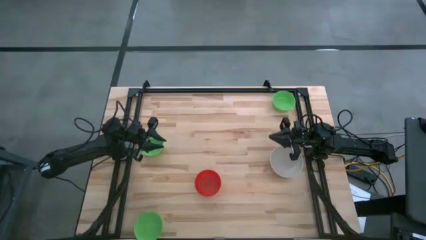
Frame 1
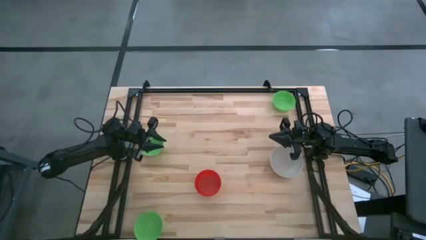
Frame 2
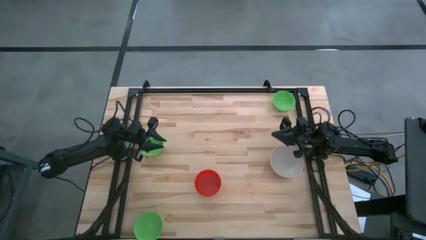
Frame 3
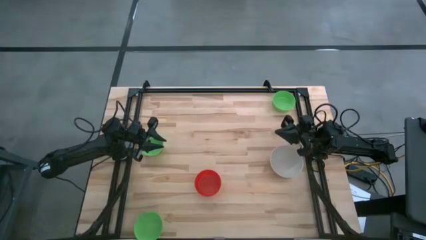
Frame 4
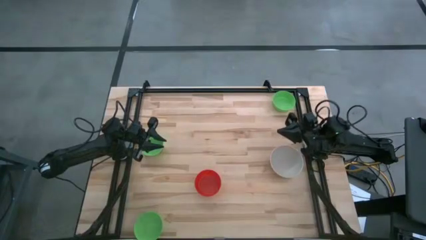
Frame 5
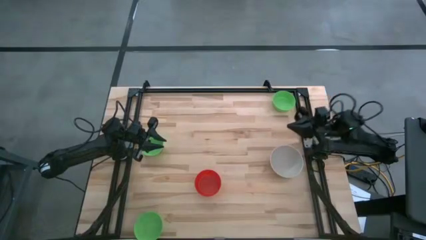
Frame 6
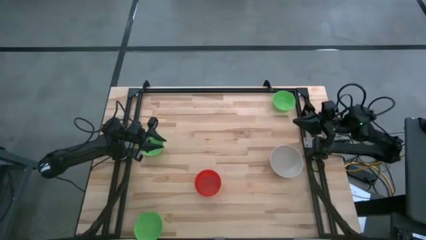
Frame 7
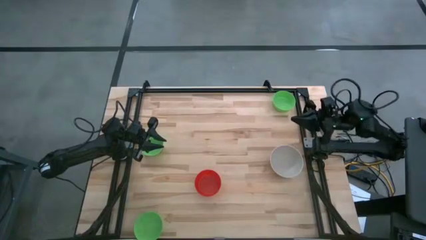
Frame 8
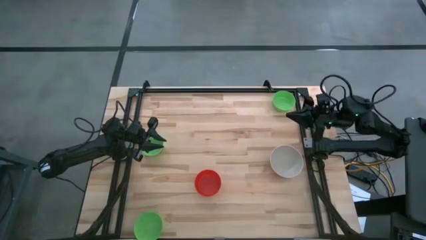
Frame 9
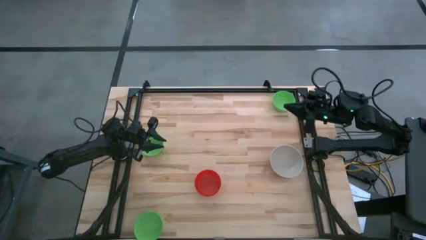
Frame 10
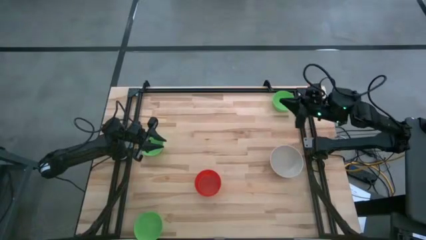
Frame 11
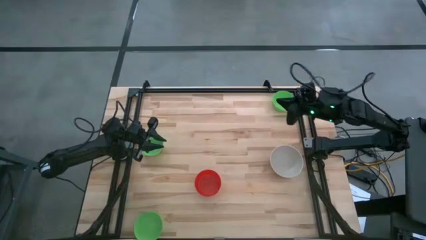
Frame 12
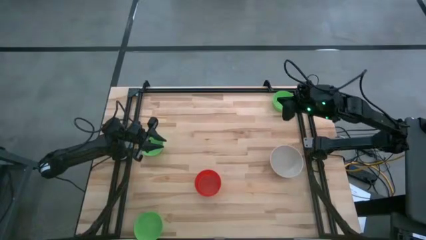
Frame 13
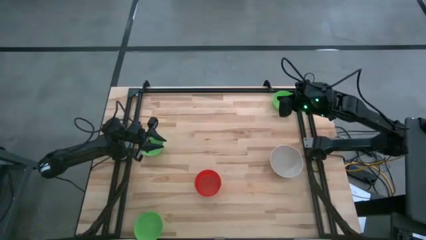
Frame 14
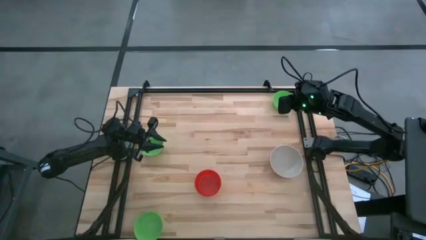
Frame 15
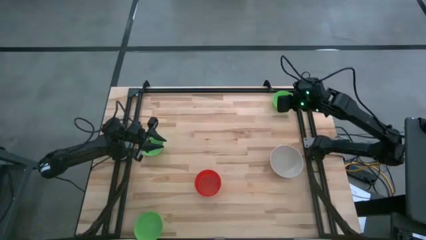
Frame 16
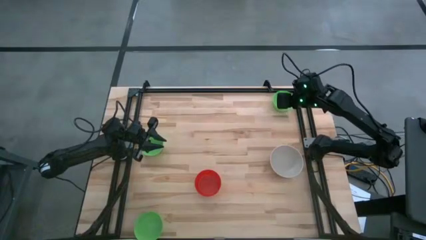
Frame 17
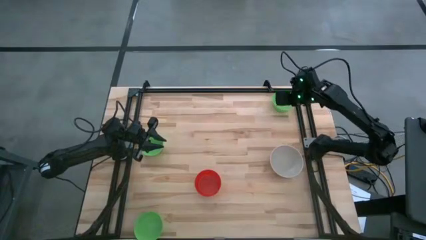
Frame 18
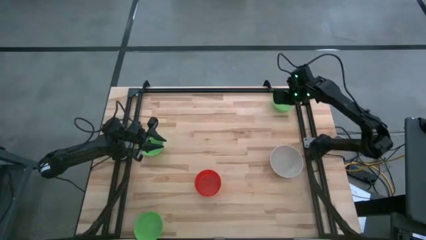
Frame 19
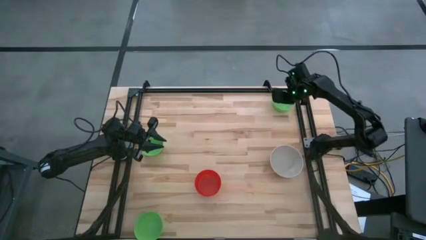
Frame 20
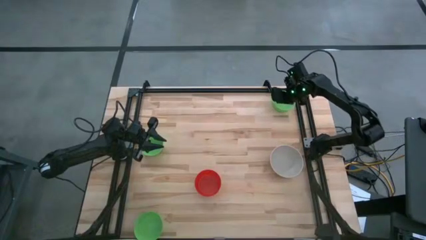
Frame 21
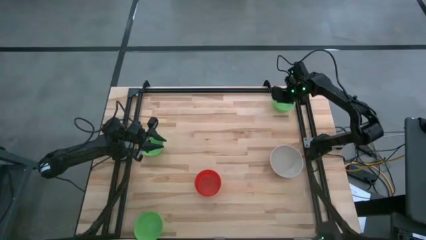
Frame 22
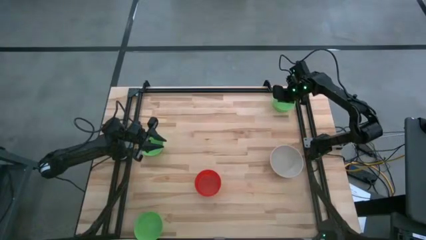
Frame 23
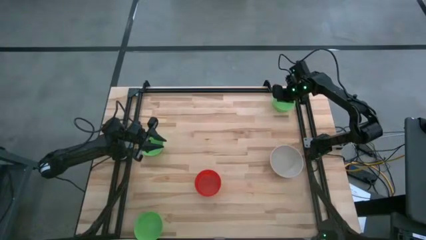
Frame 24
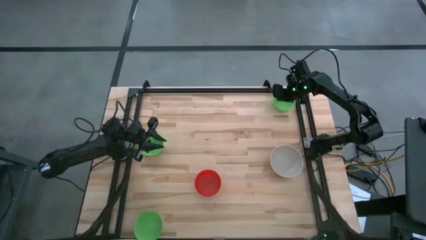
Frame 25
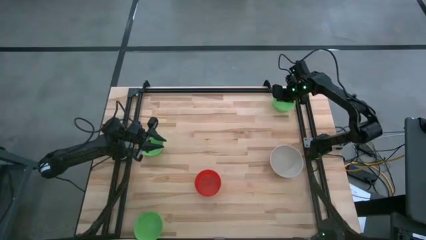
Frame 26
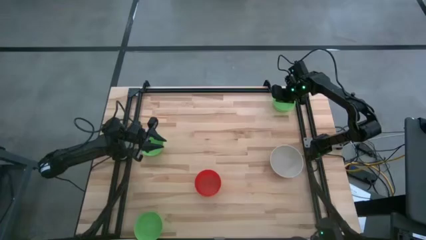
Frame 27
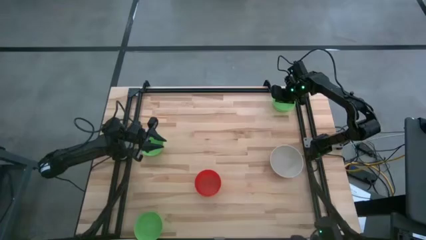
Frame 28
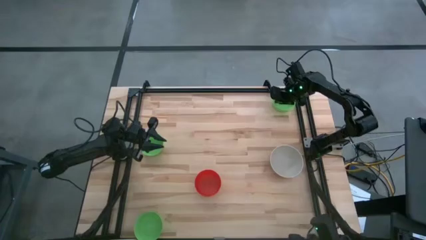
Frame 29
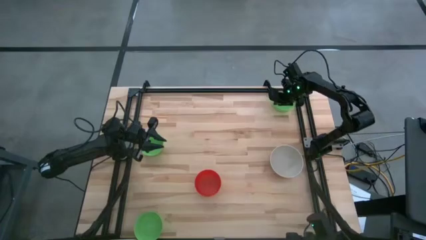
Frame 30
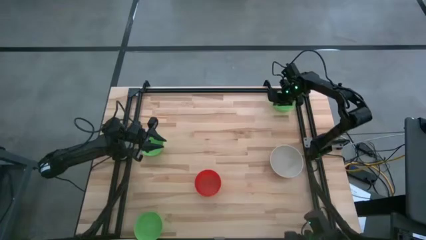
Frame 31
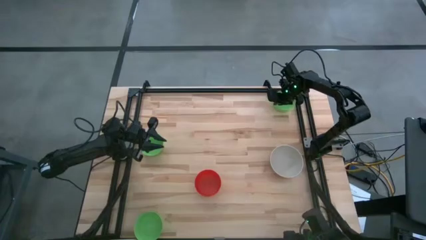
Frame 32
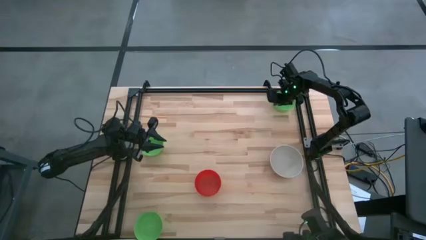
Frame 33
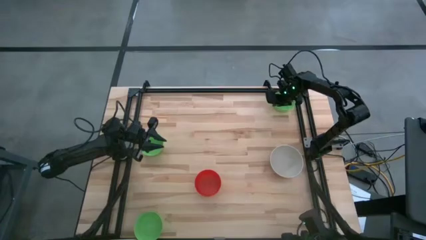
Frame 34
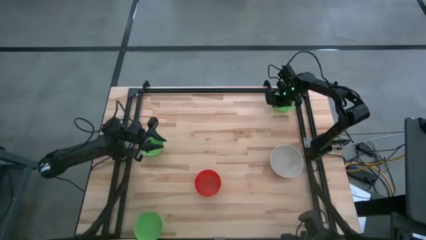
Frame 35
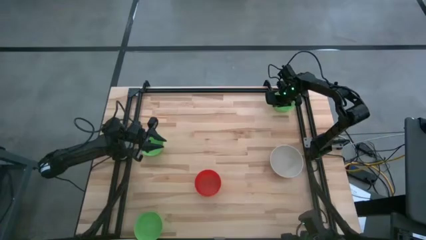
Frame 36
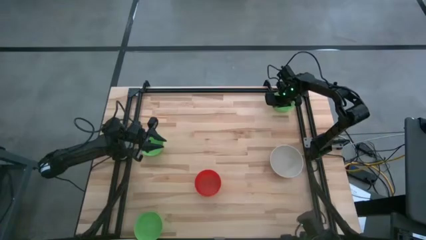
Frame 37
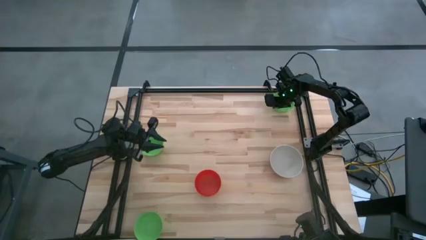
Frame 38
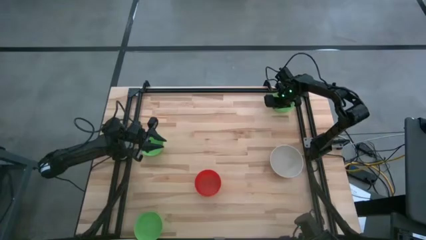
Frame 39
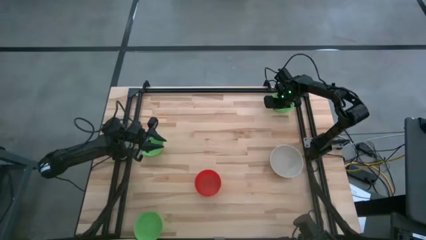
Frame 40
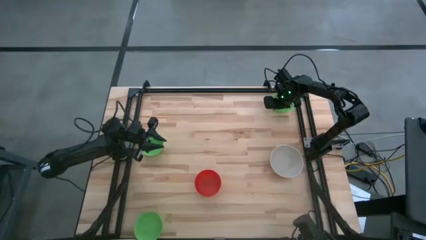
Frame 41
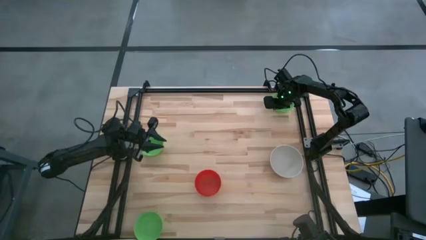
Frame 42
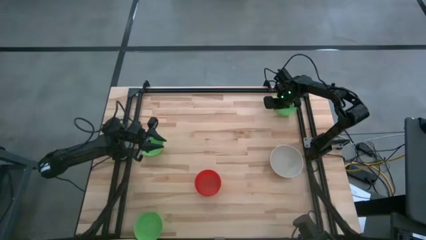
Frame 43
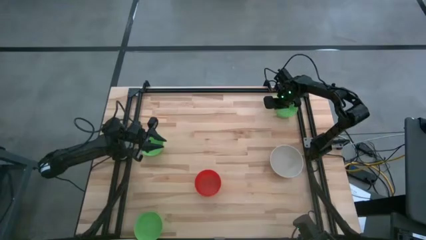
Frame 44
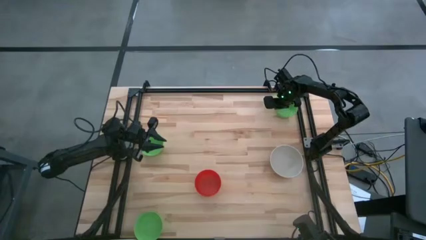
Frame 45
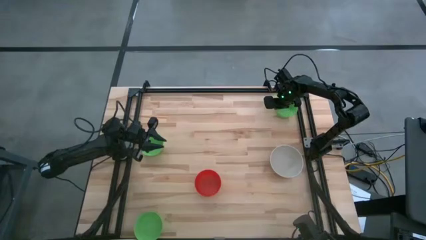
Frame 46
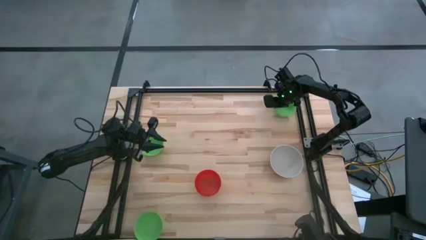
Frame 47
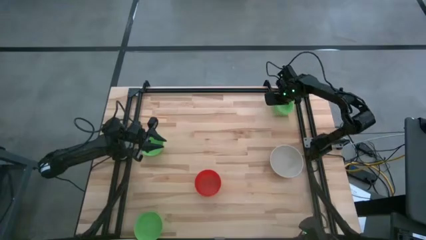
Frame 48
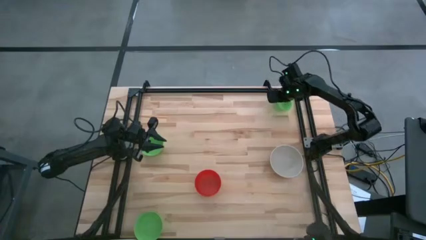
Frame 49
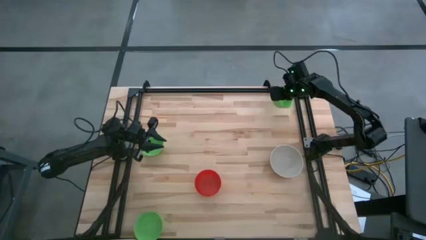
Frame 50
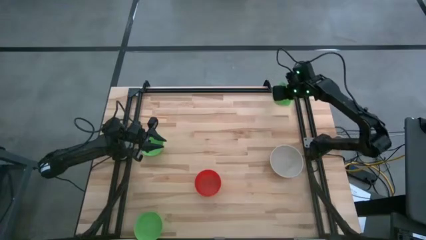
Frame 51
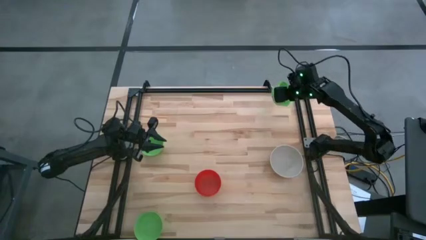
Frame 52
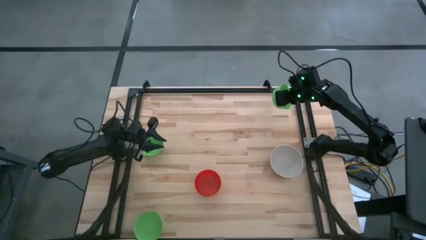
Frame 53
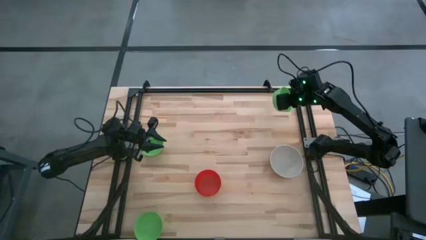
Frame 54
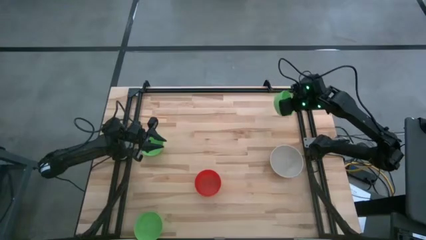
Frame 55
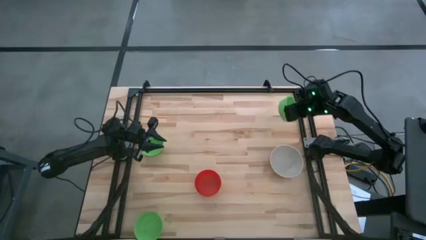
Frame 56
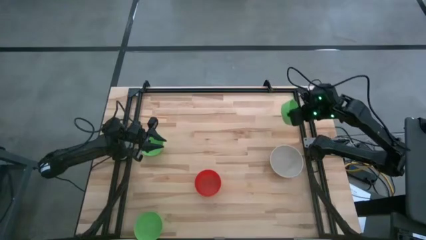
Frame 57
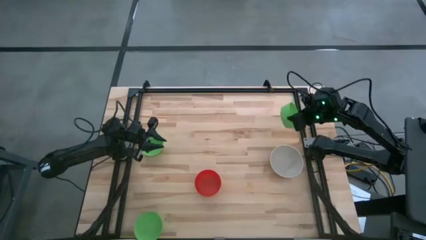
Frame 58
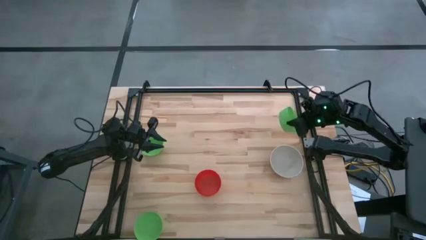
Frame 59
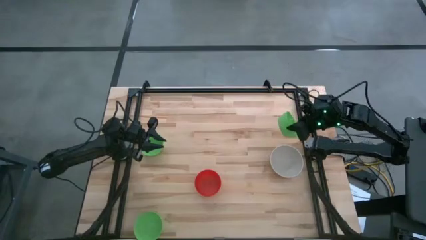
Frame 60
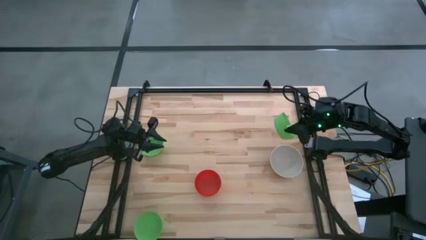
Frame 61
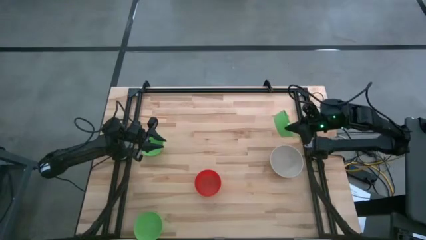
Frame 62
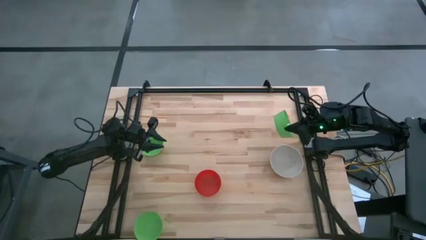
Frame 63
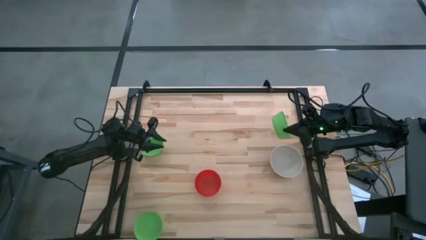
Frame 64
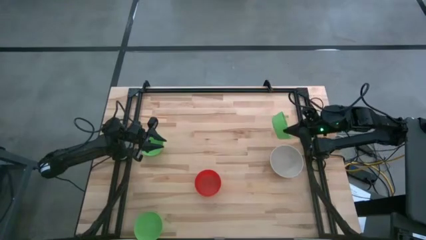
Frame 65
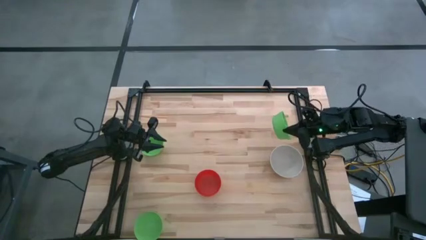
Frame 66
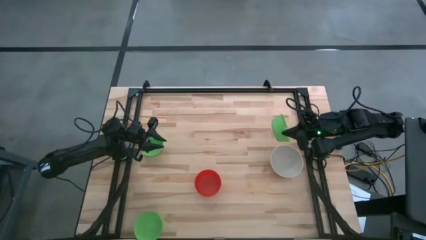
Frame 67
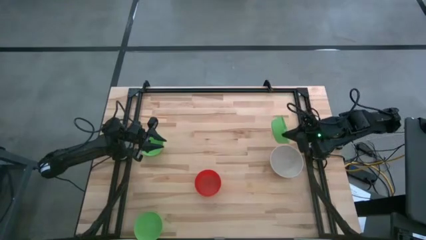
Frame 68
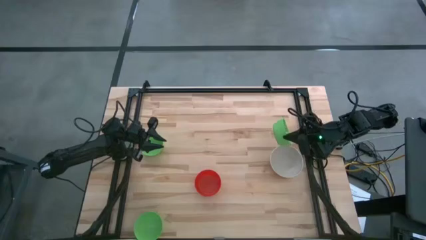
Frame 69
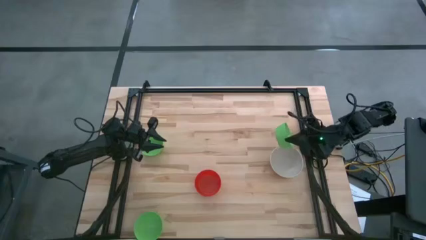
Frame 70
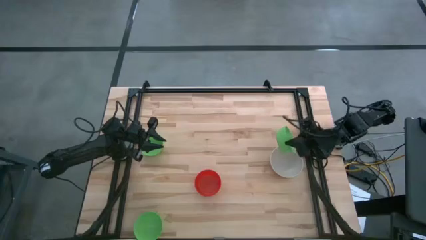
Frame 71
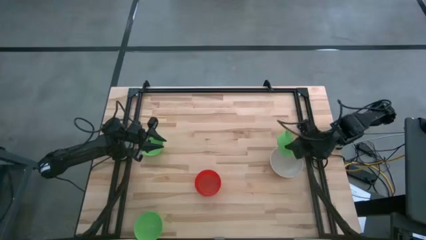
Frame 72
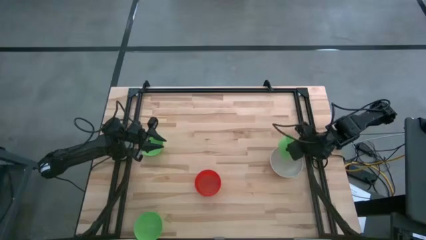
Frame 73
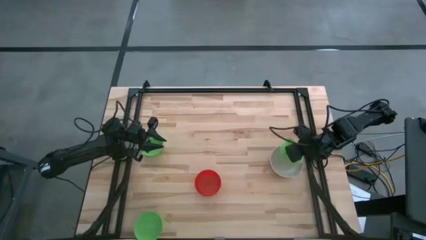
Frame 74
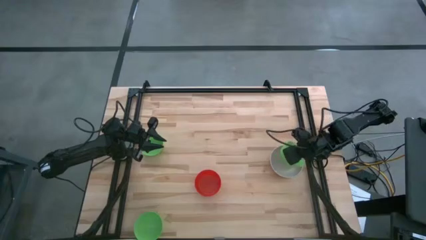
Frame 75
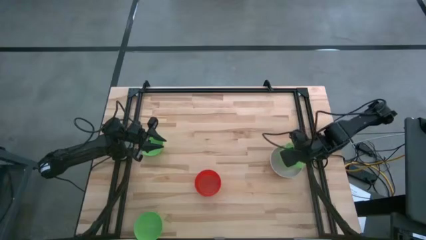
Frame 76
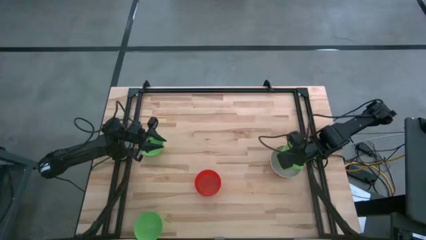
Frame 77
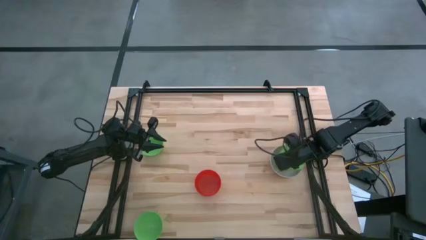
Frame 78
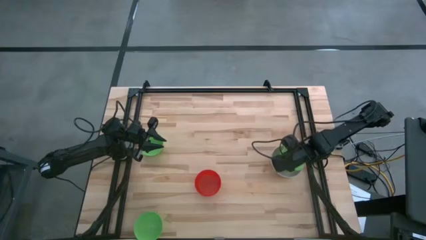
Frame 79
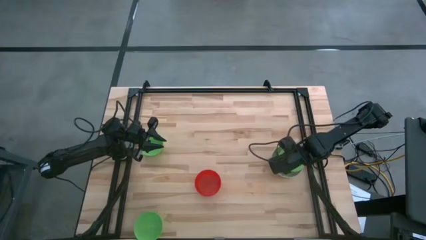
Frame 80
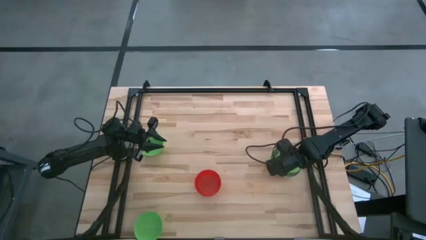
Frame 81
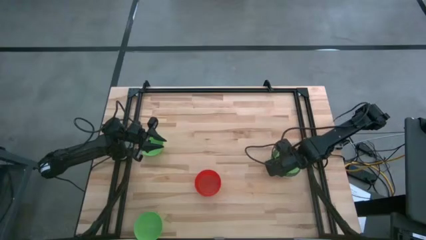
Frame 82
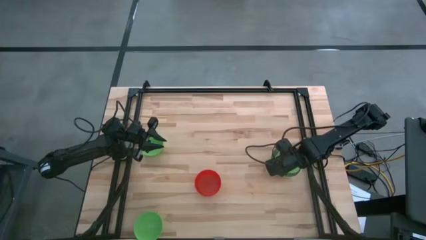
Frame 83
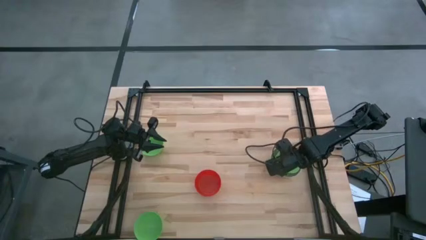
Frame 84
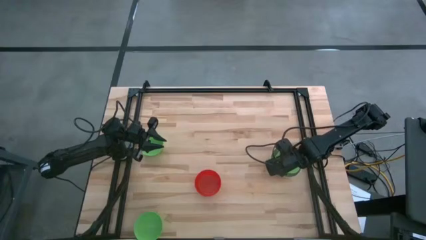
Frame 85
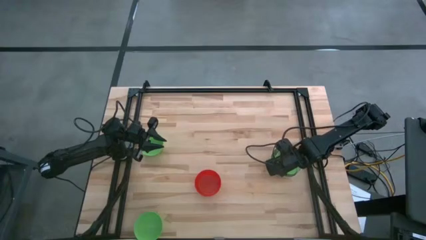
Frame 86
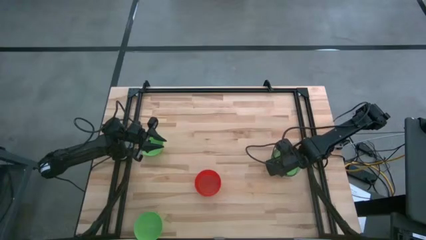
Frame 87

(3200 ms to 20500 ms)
Stack the top green bowl on the gray bowl
